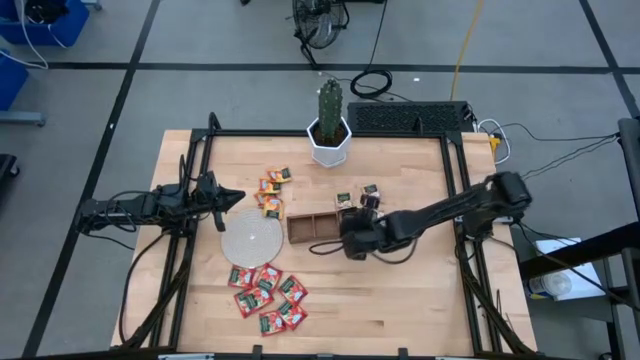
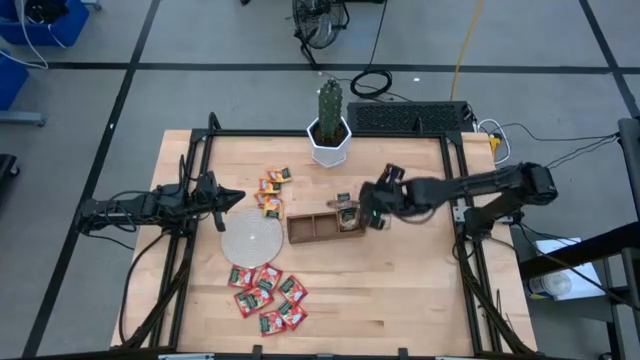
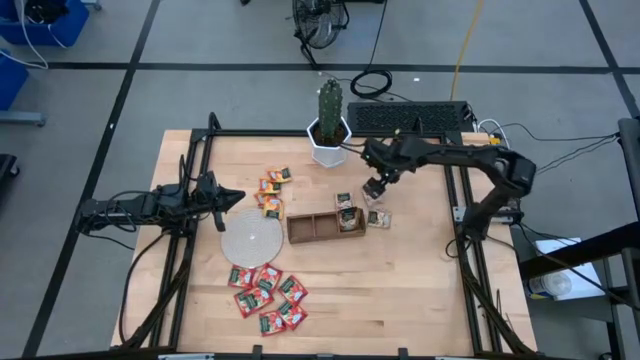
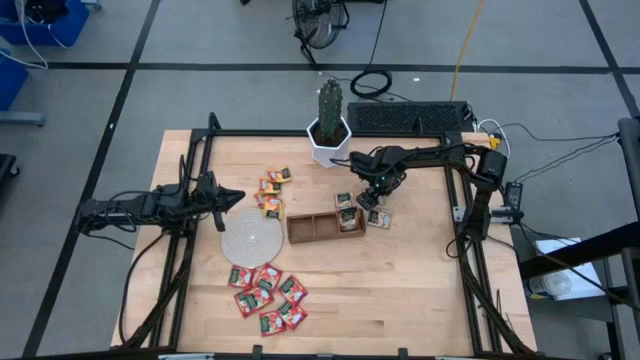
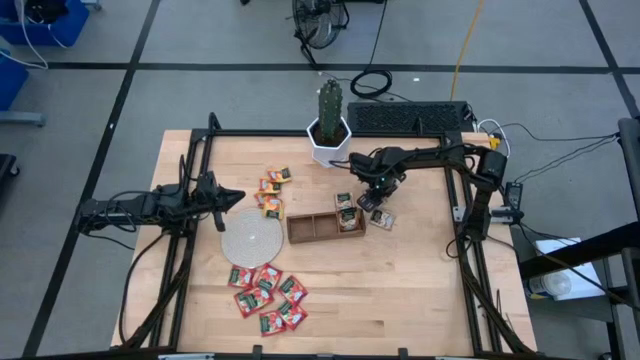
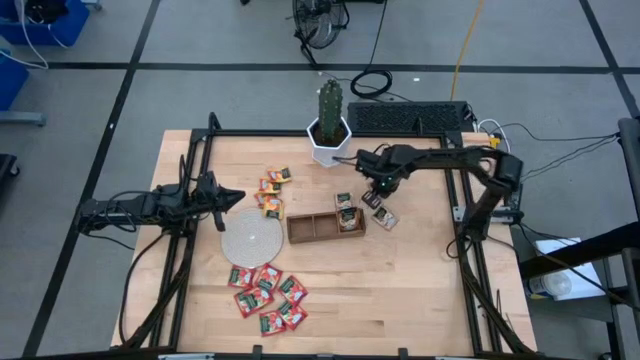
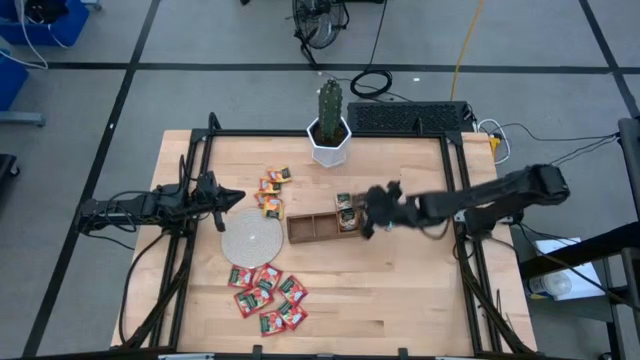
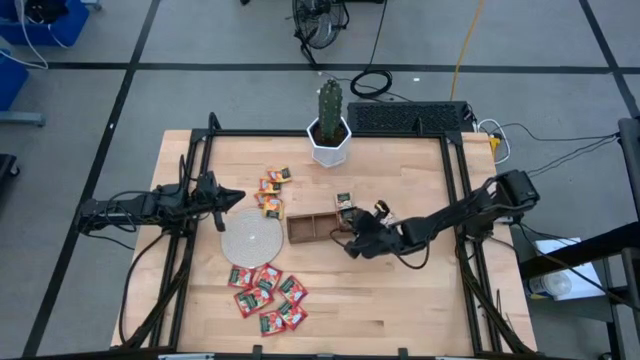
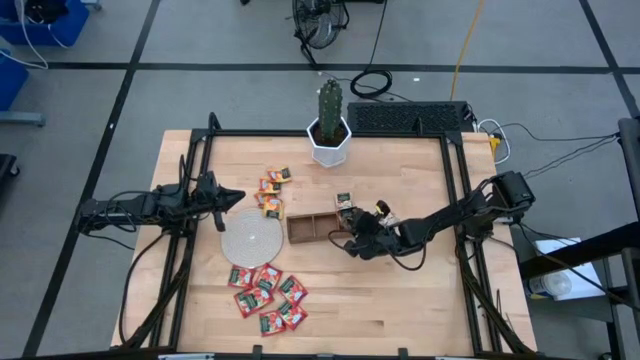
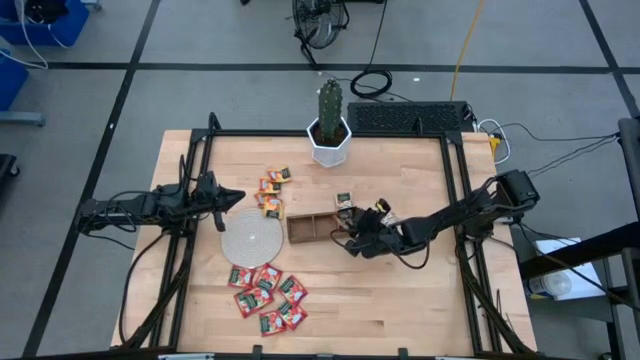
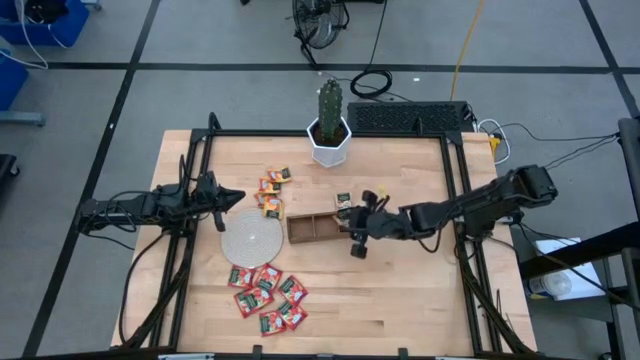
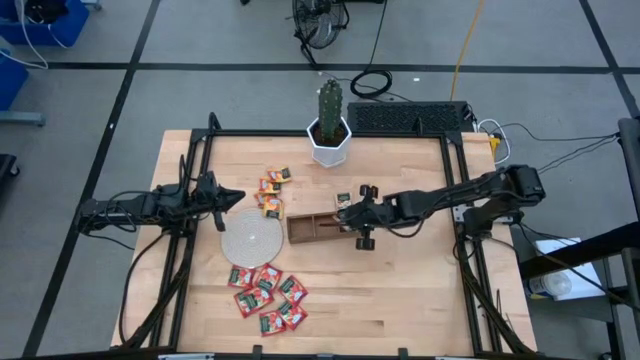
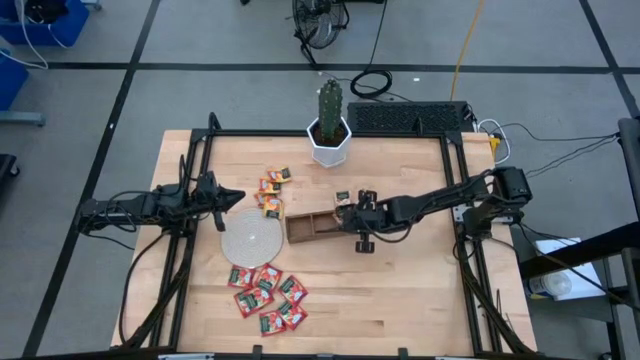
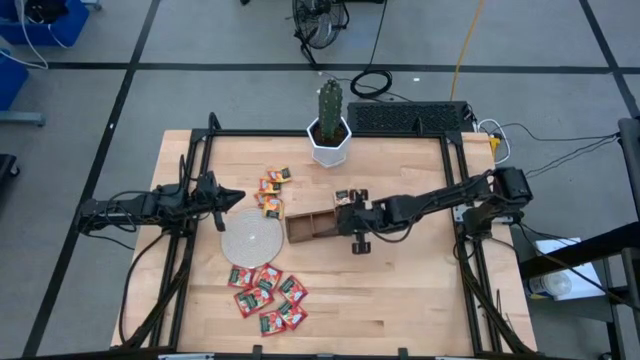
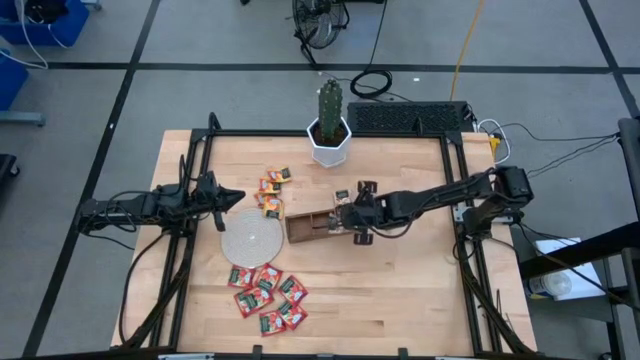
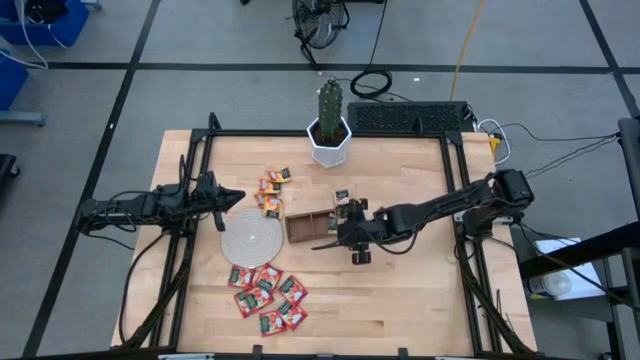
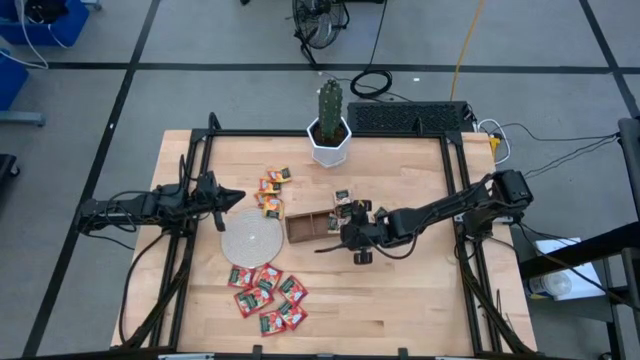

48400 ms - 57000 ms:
Task: Pick & Place Tea
Put the brown tea bag into the right section of the wooden organizer

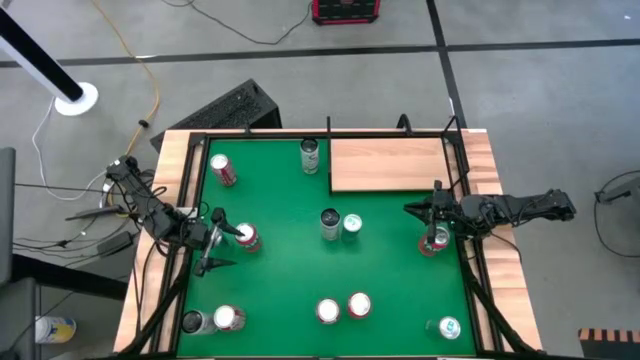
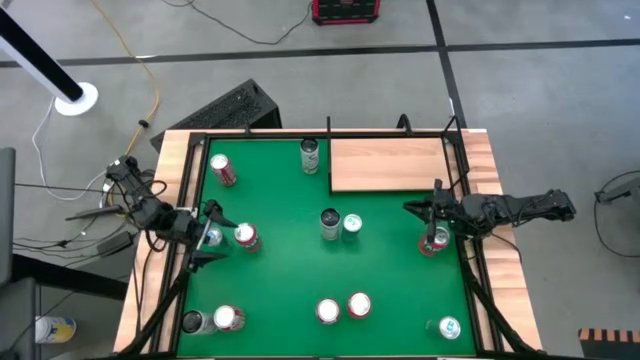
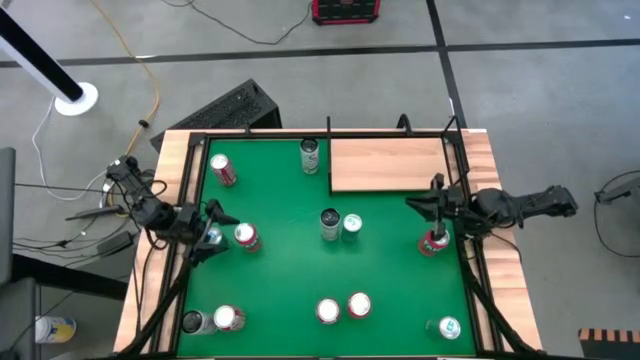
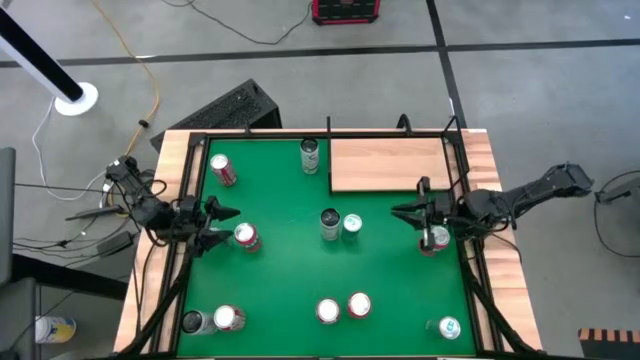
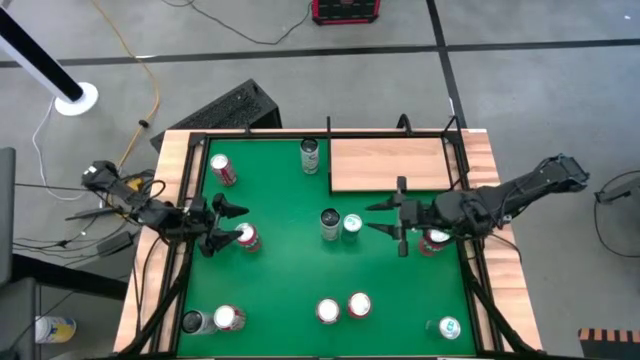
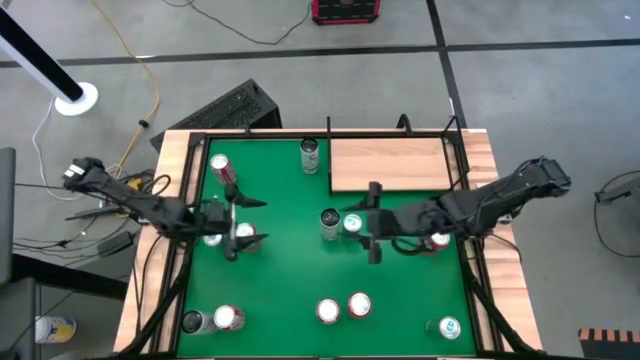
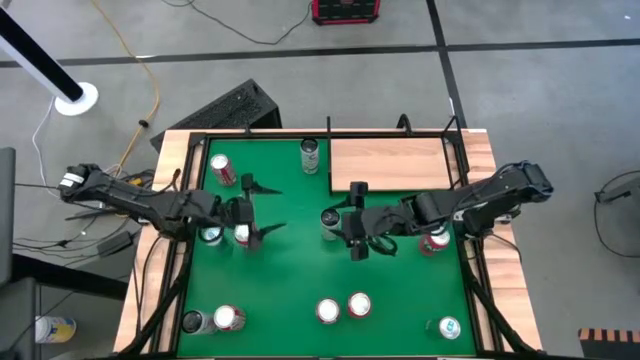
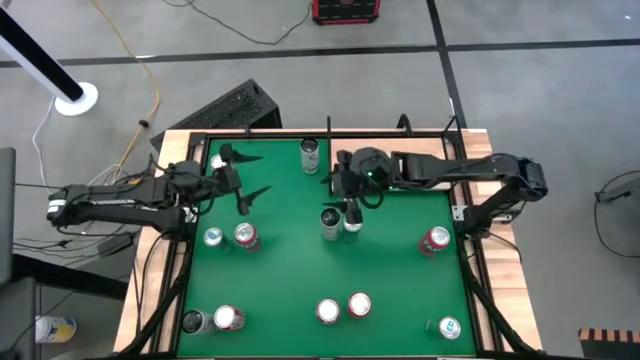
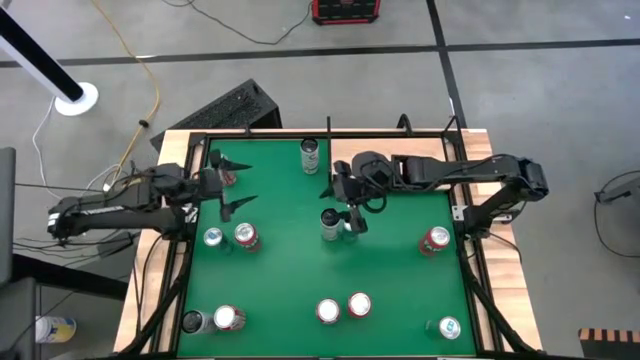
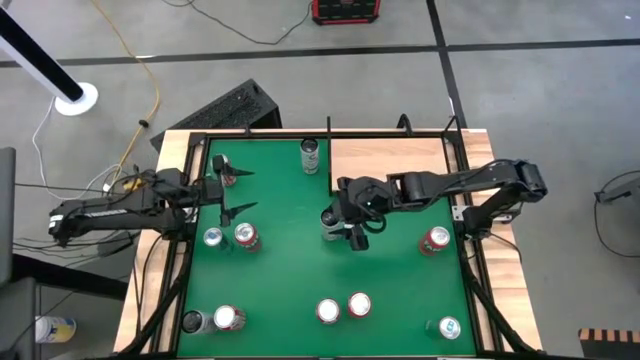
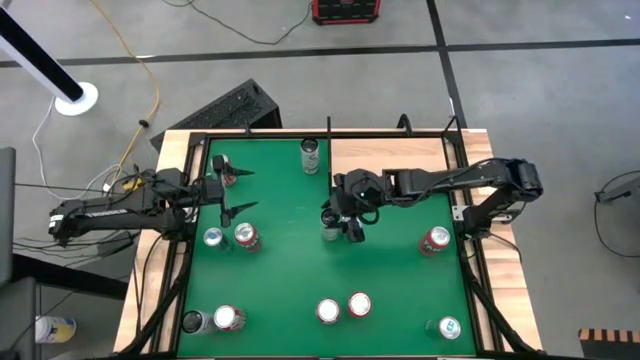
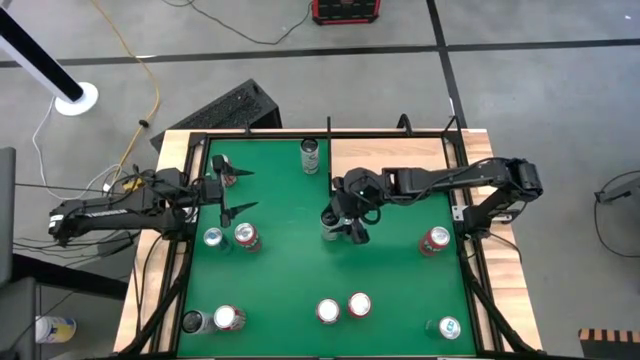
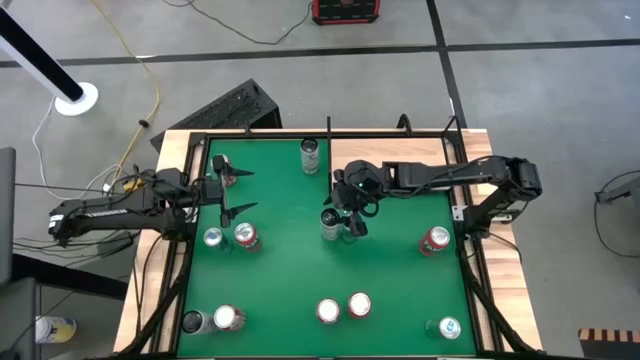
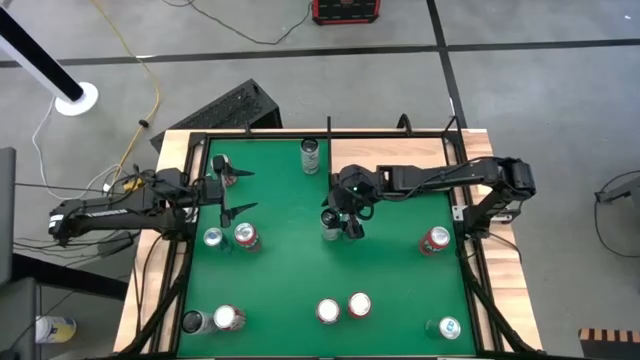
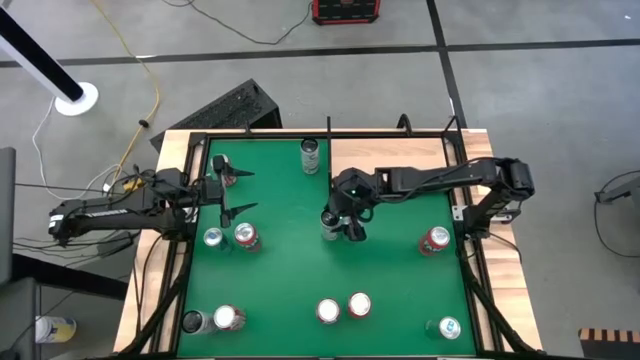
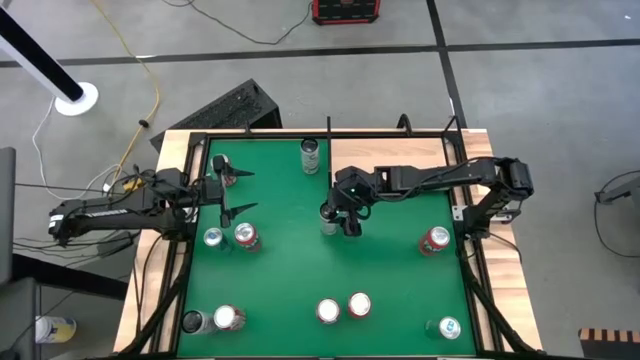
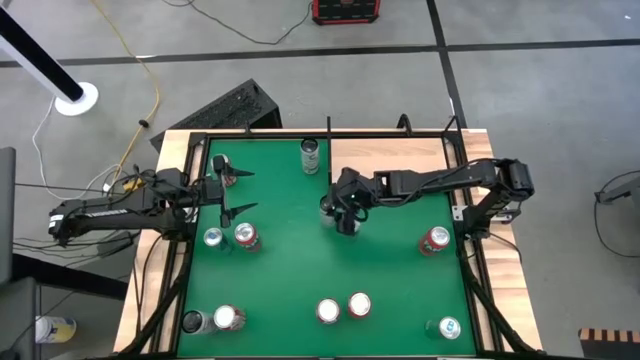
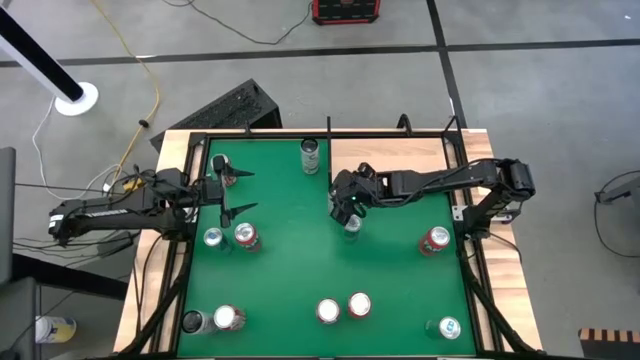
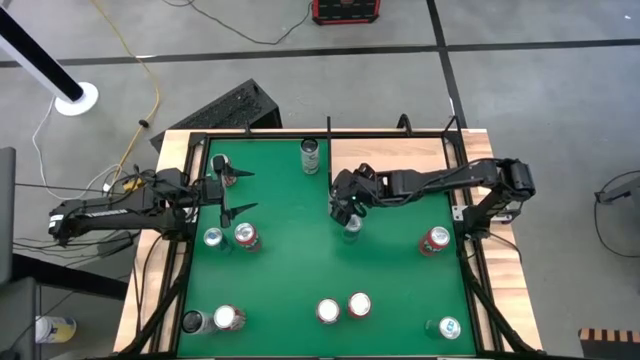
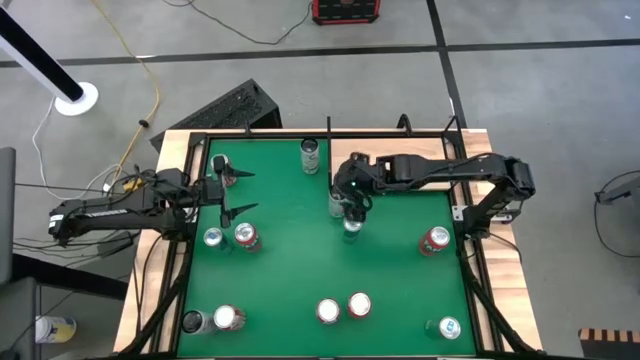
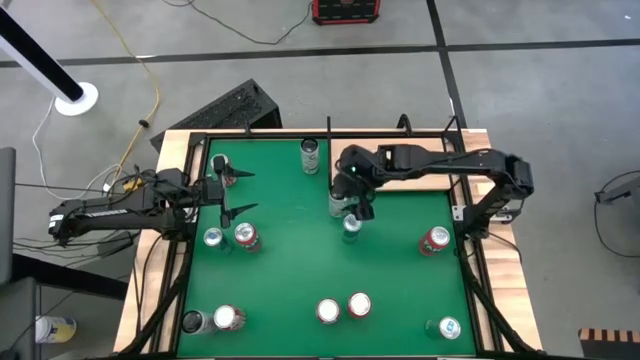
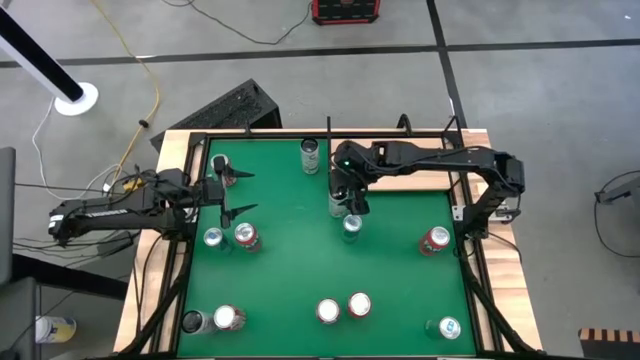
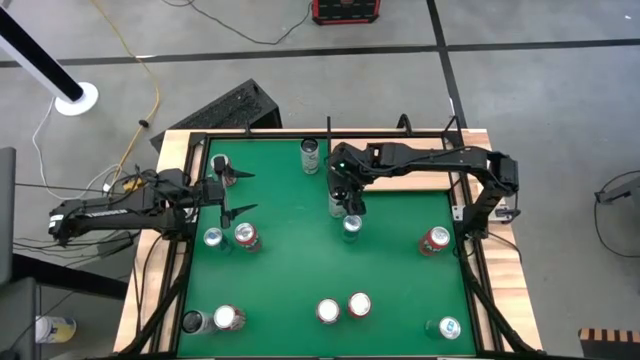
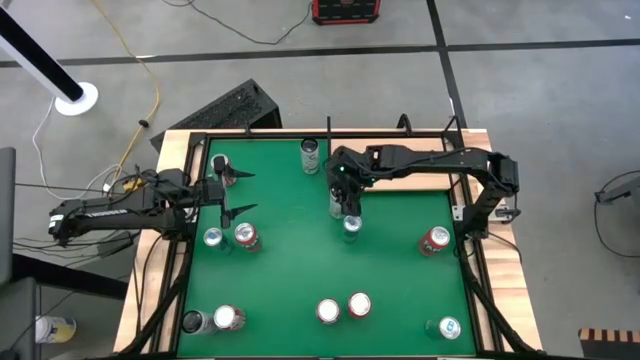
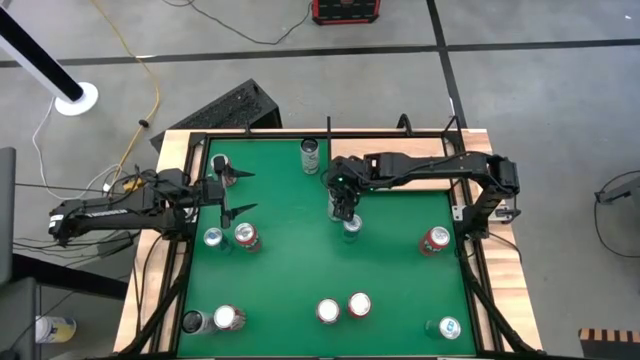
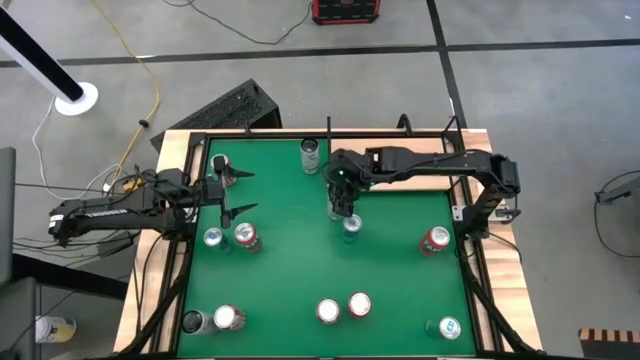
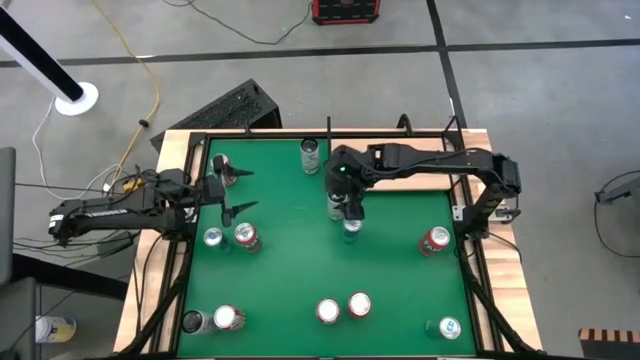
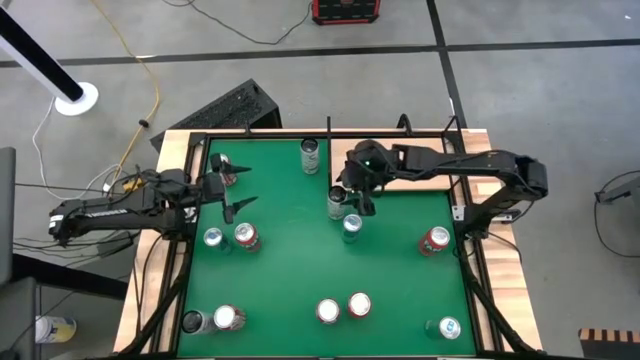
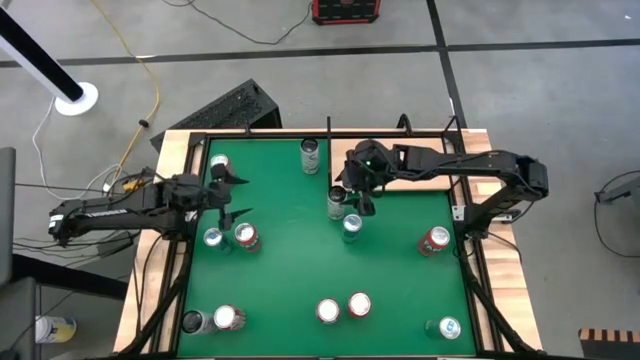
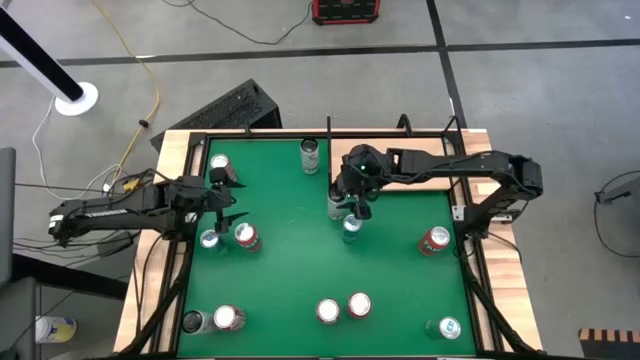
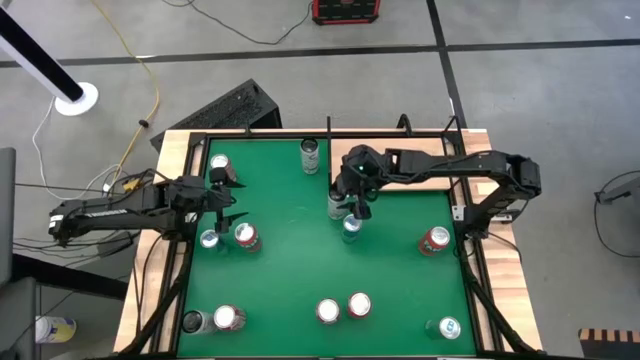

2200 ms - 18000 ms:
Task: Sort soda cans
Put the middle white soda can on the shelf
